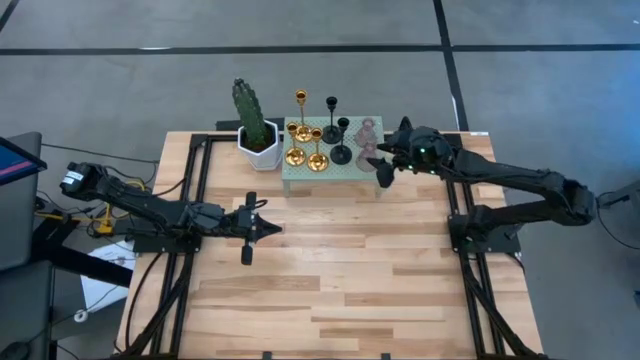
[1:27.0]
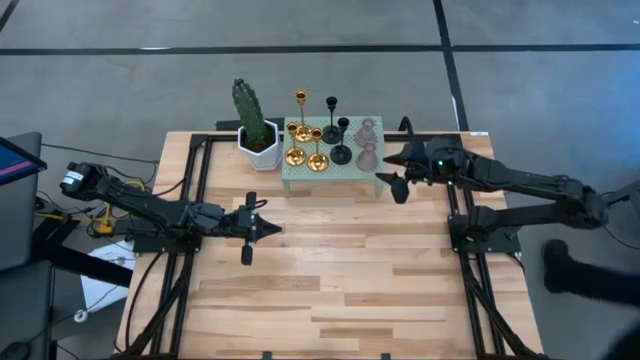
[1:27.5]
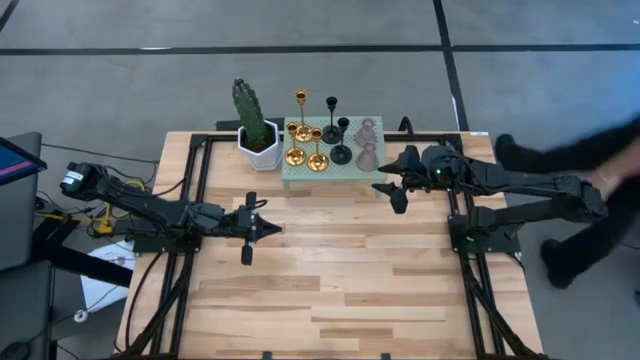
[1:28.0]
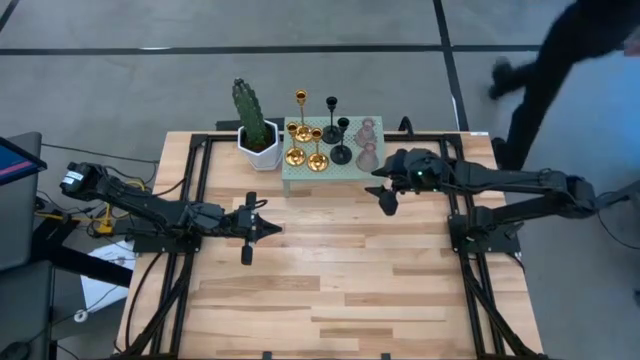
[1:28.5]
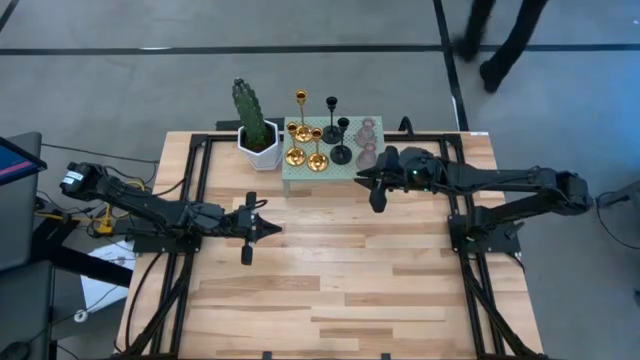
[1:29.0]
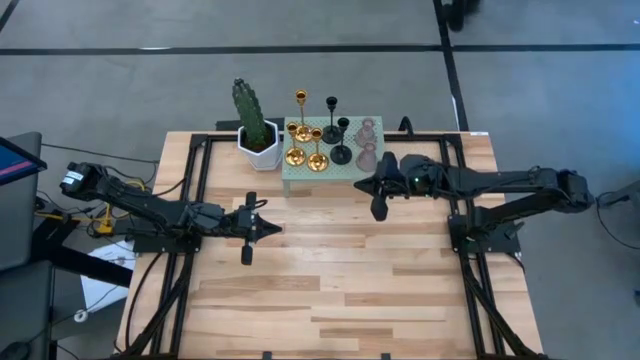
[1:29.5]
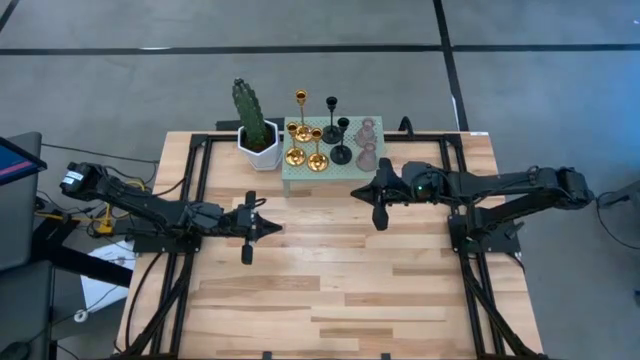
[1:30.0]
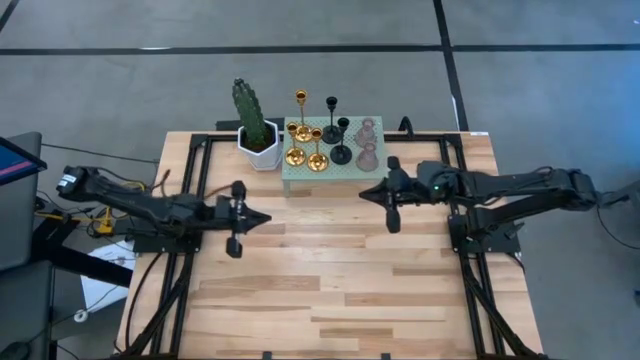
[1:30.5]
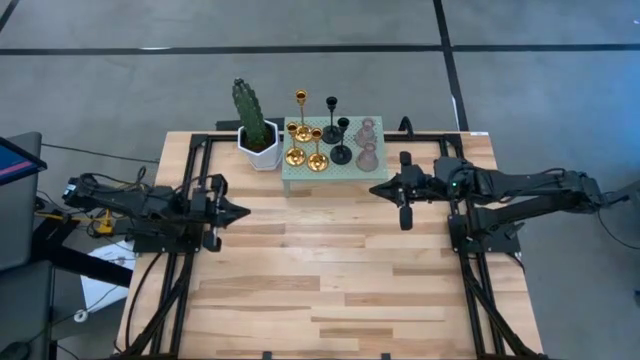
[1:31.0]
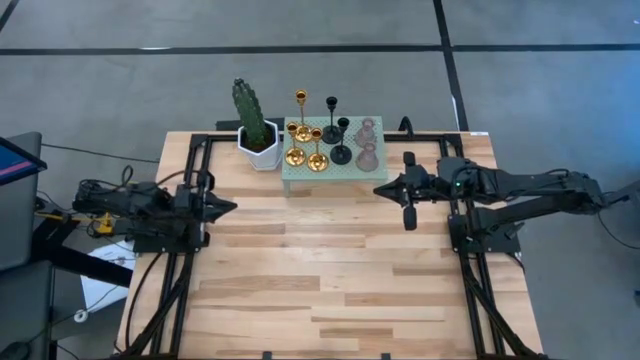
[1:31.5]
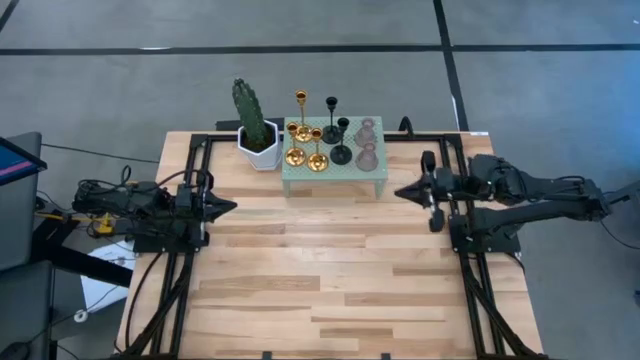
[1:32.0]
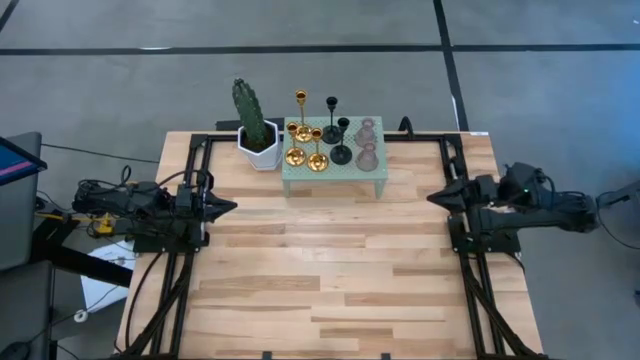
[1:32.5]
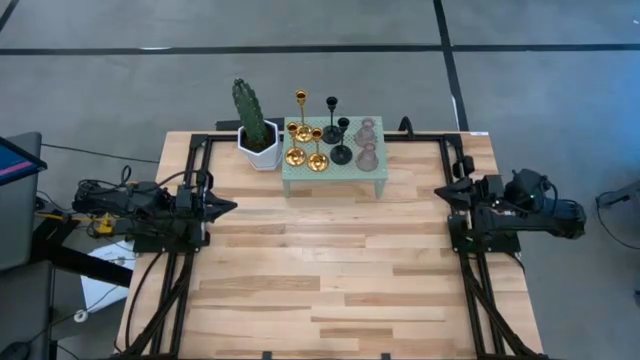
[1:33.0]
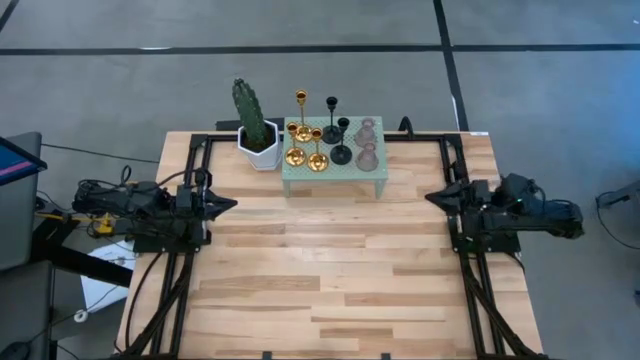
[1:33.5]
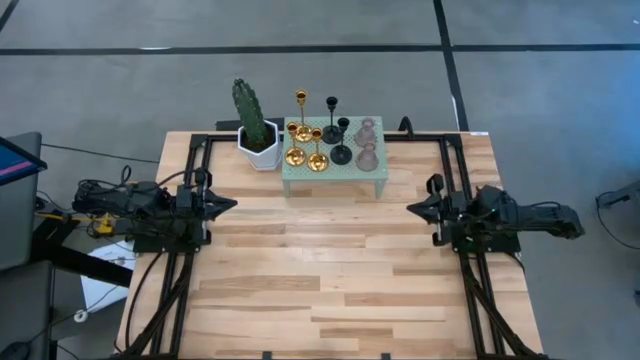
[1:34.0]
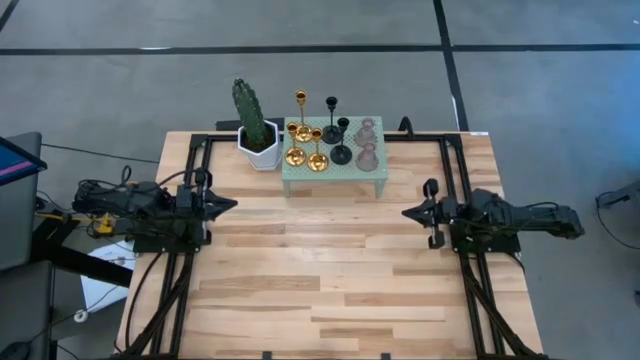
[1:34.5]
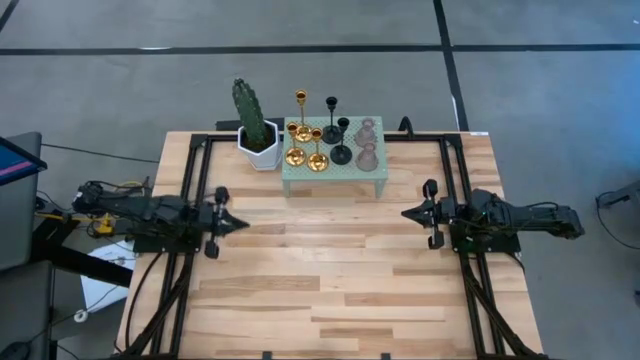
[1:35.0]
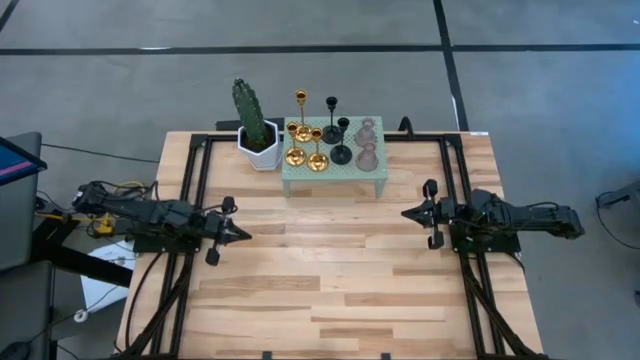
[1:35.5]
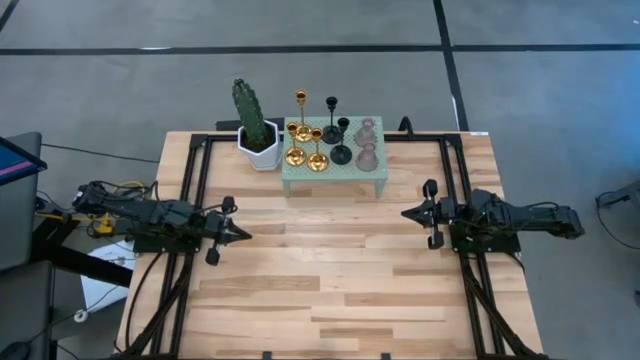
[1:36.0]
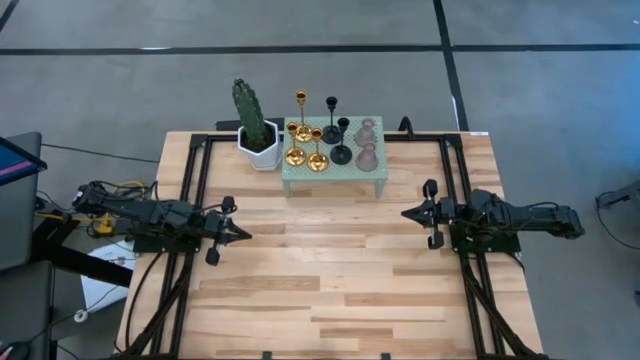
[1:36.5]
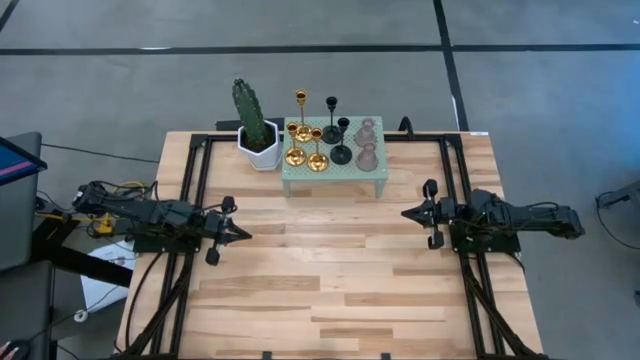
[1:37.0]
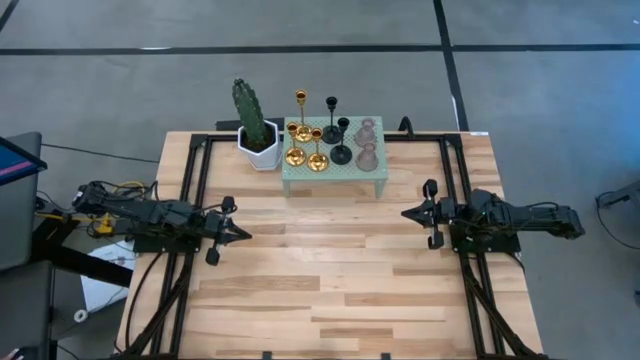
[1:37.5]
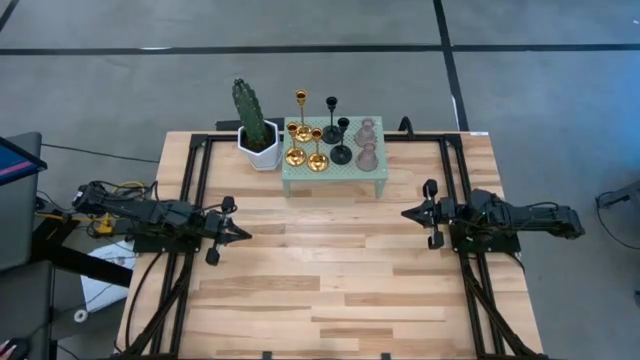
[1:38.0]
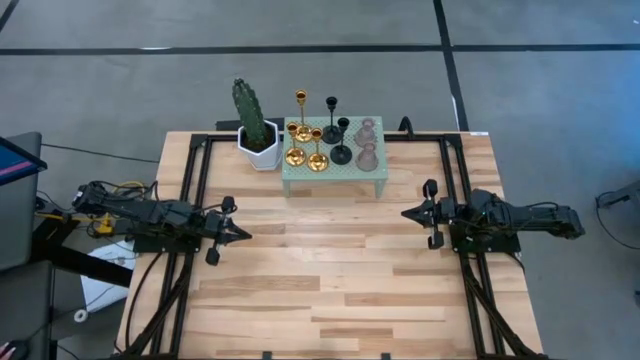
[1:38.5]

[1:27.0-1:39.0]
Task: Pick & Place candle stick holders
Return to Home Position

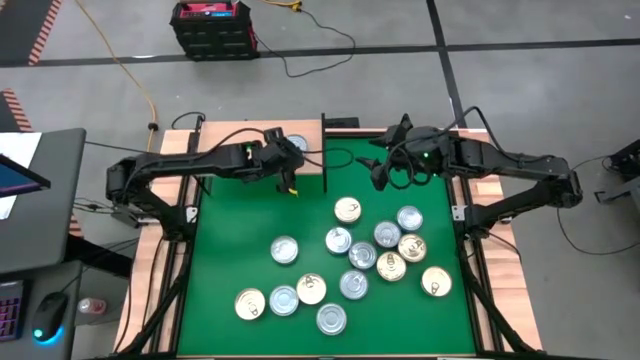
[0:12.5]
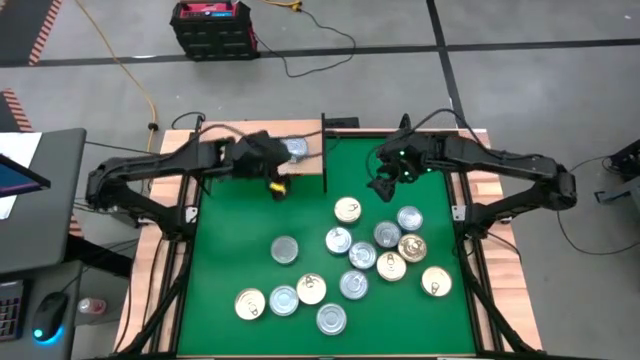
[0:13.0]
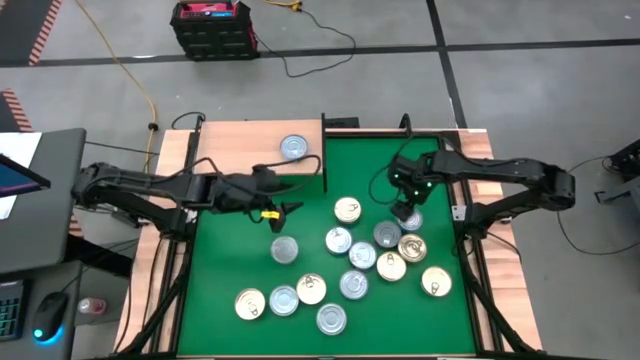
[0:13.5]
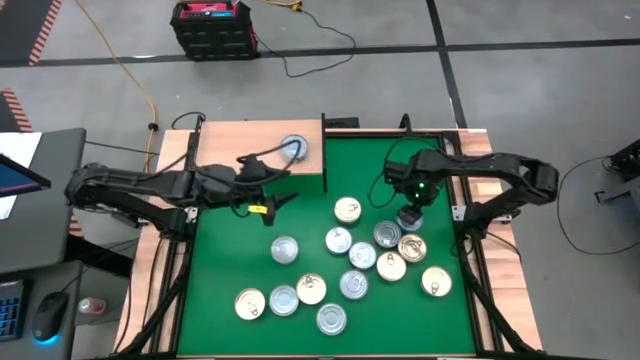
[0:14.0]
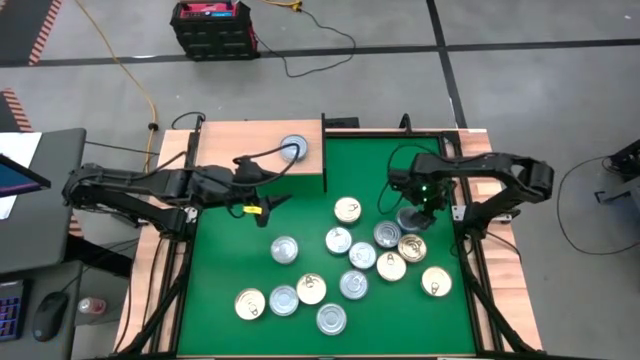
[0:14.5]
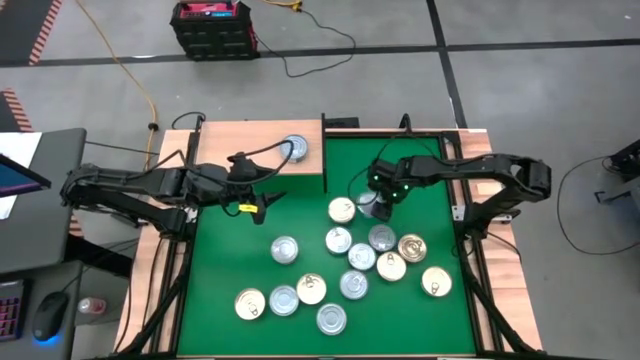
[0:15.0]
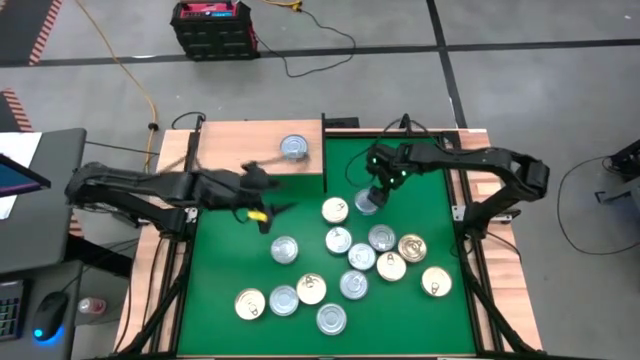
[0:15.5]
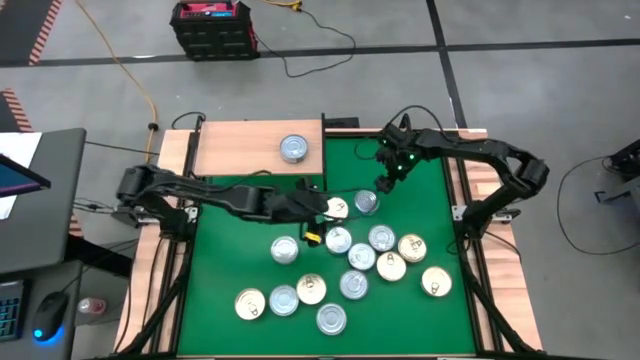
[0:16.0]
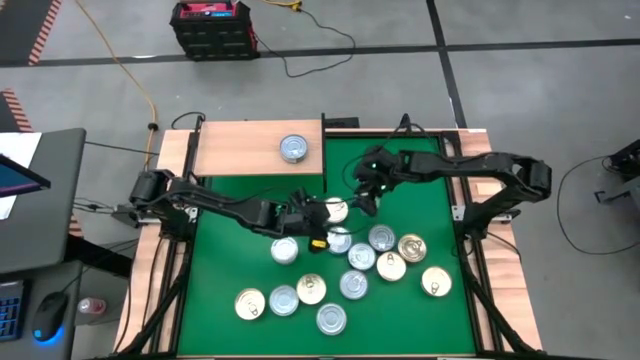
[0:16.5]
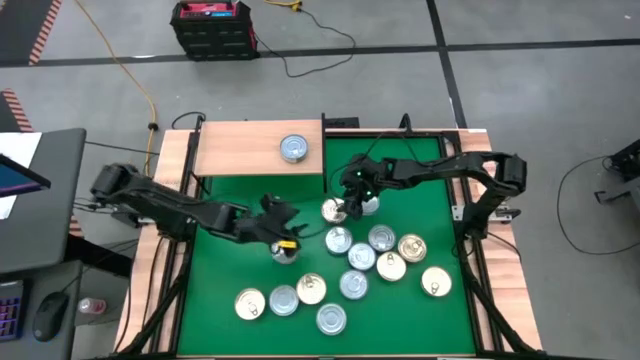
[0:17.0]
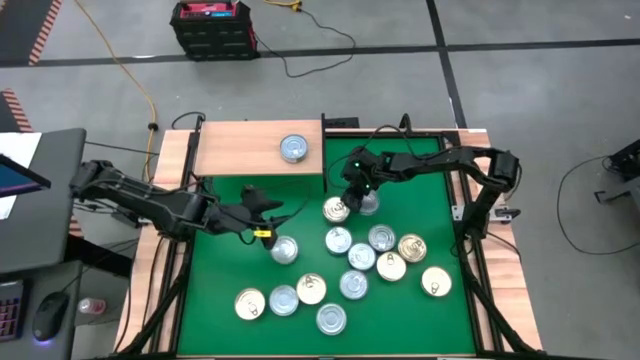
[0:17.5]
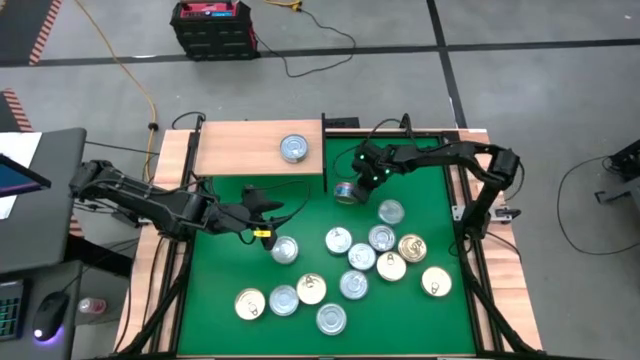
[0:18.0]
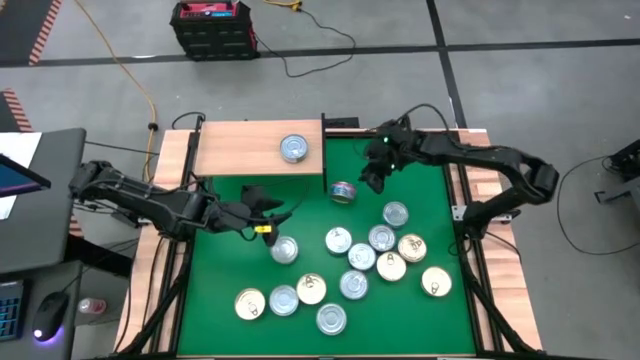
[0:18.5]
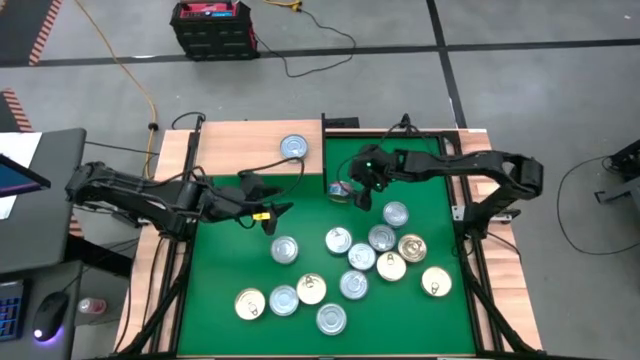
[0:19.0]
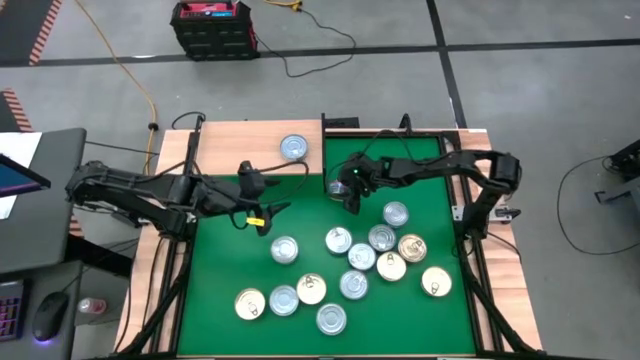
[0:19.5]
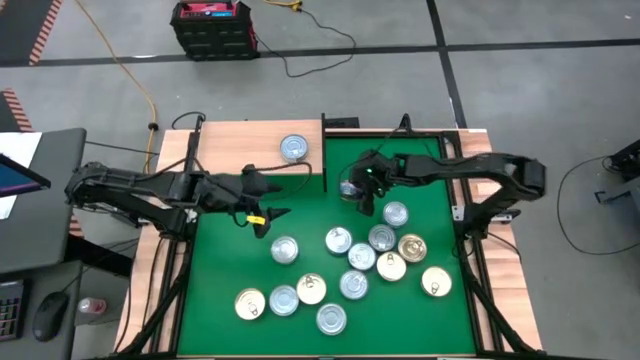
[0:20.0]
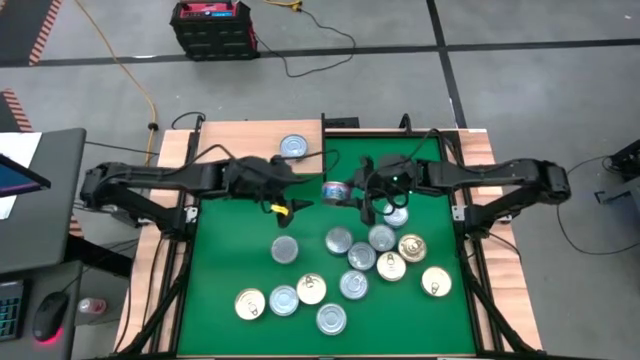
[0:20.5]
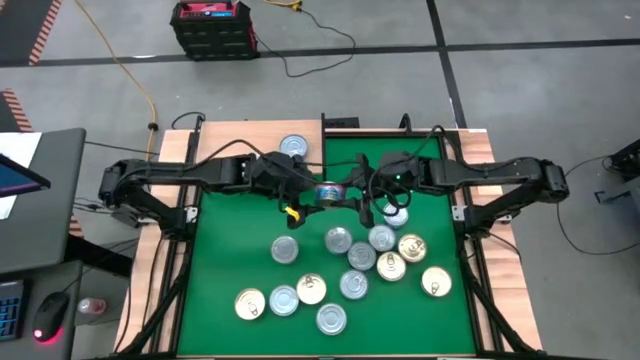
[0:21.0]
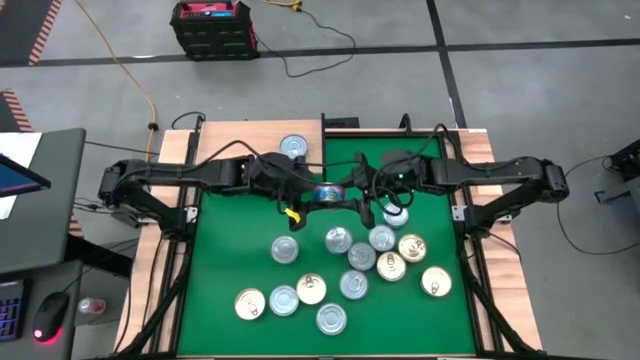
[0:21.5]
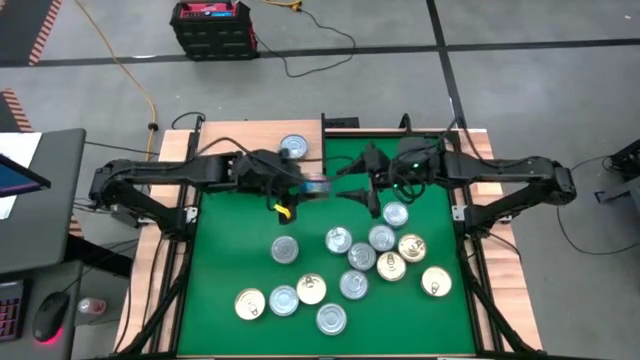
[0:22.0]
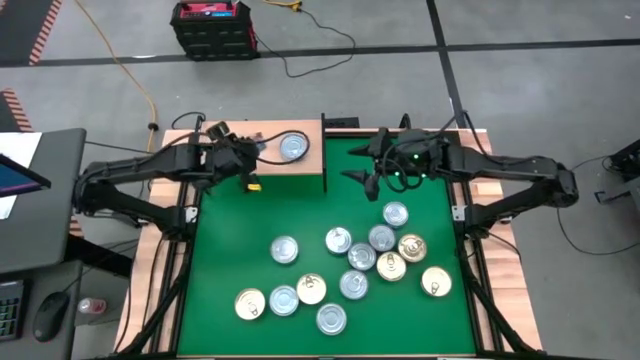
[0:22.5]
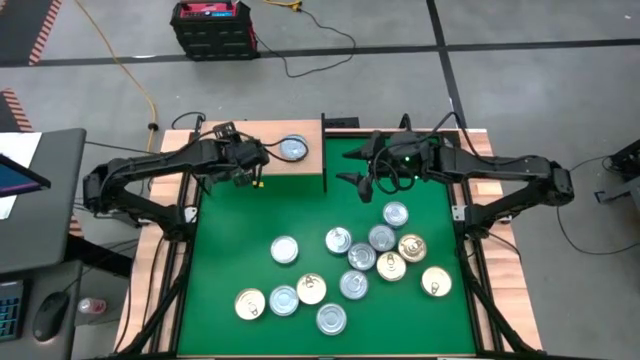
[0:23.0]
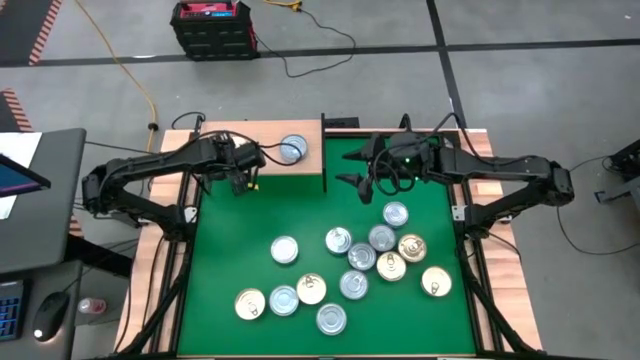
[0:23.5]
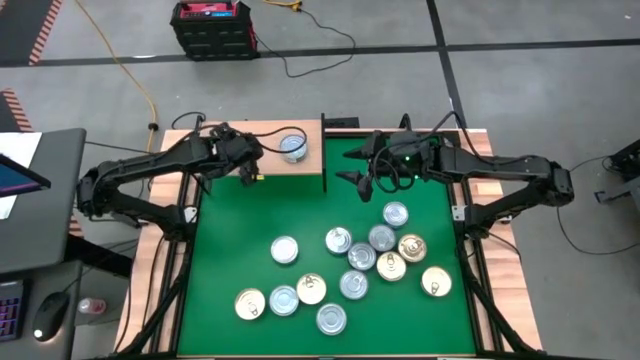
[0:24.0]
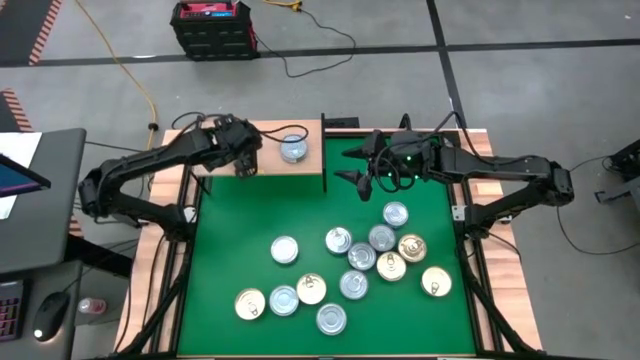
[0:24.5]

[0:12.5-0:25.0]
Task: Stack canned seafood by type on shelf
Put the blue and pink tuna can on the shelf
